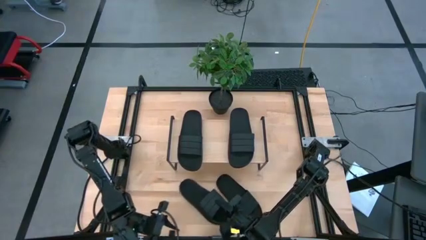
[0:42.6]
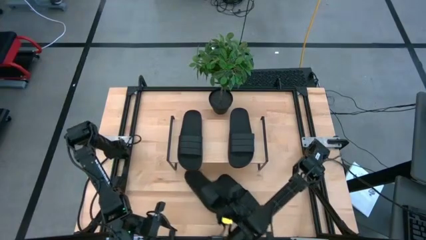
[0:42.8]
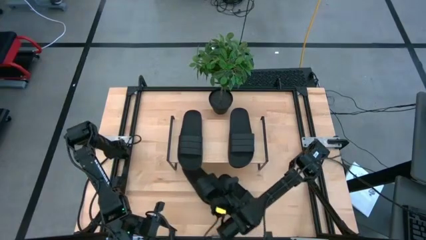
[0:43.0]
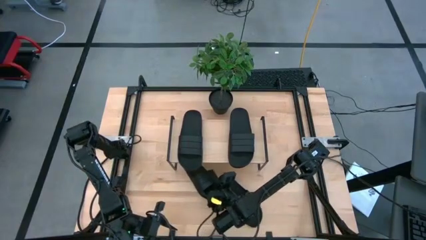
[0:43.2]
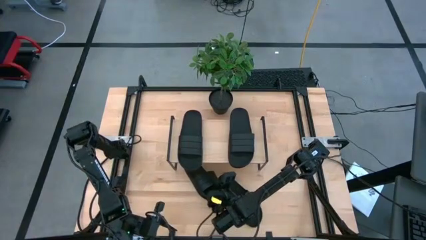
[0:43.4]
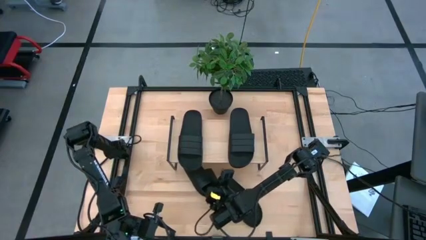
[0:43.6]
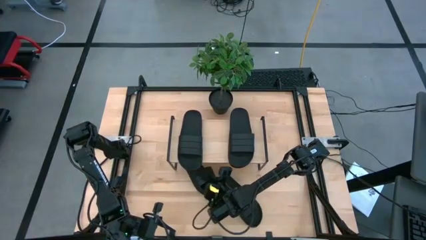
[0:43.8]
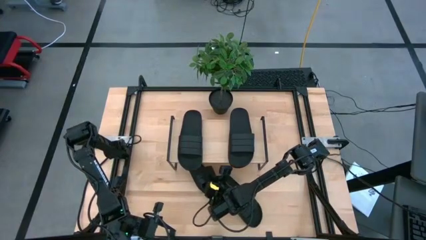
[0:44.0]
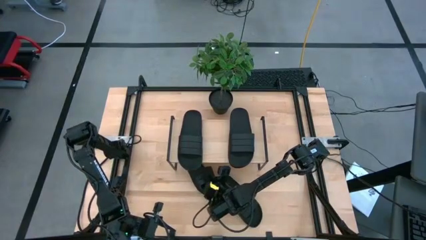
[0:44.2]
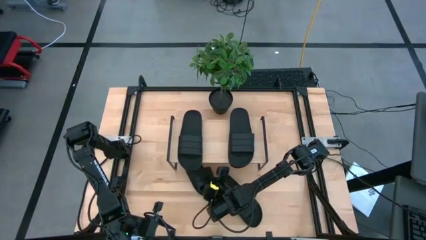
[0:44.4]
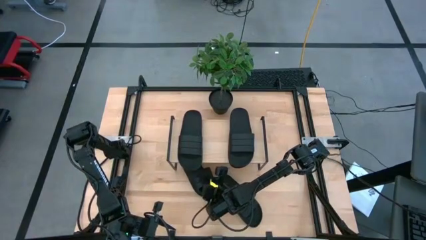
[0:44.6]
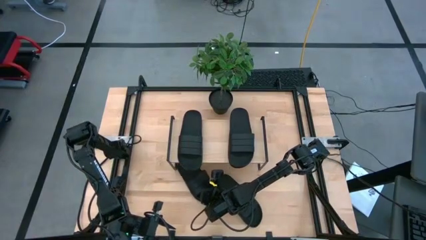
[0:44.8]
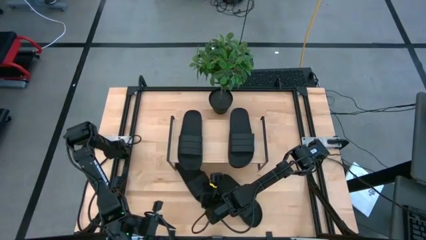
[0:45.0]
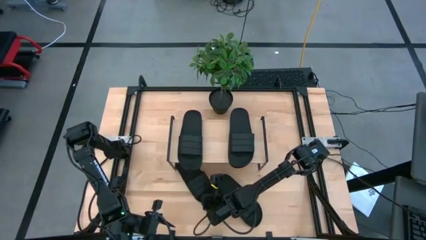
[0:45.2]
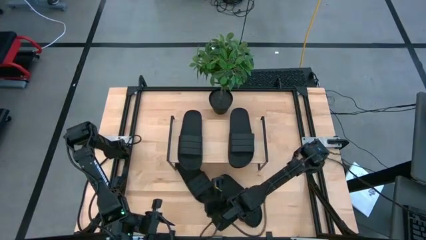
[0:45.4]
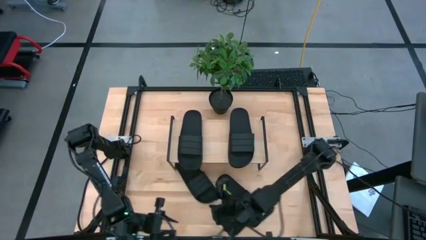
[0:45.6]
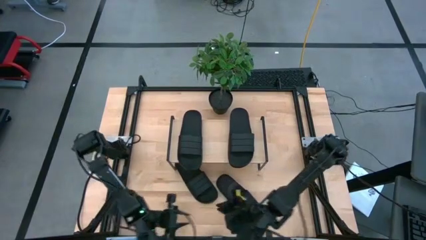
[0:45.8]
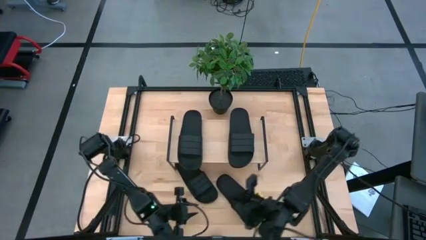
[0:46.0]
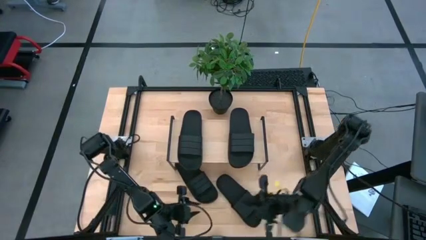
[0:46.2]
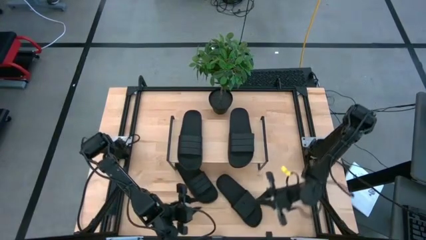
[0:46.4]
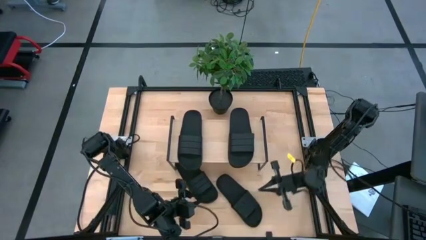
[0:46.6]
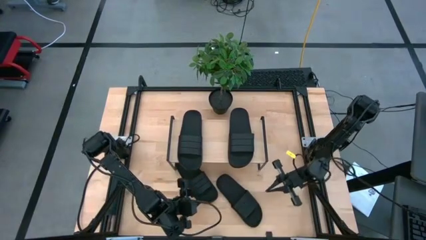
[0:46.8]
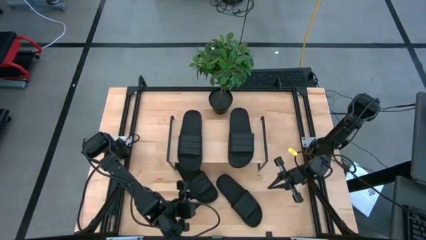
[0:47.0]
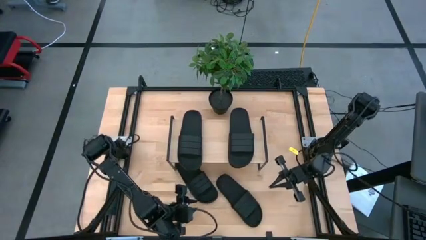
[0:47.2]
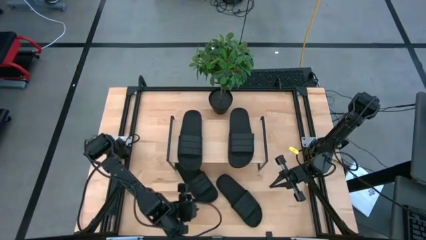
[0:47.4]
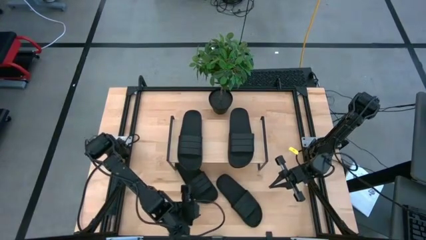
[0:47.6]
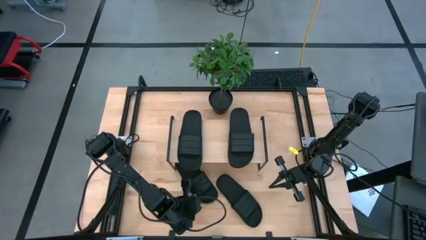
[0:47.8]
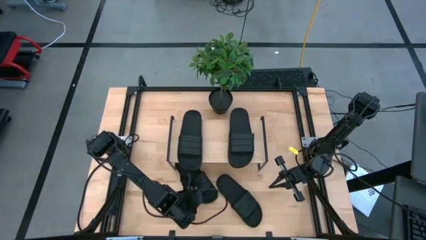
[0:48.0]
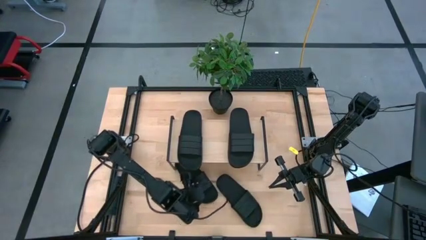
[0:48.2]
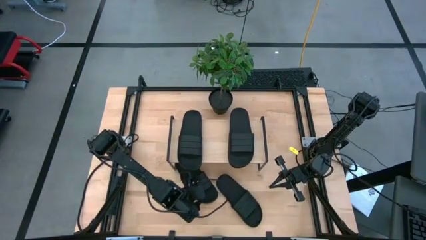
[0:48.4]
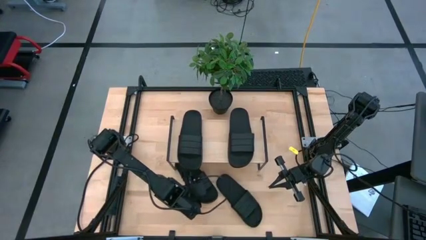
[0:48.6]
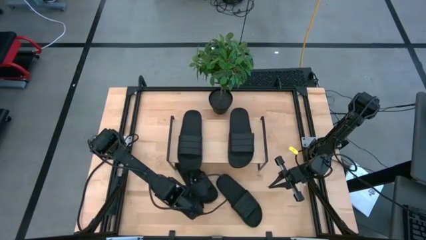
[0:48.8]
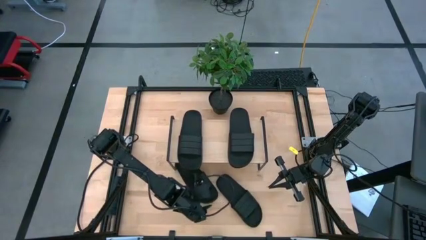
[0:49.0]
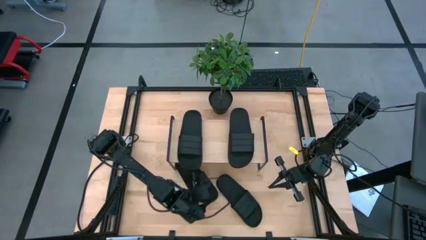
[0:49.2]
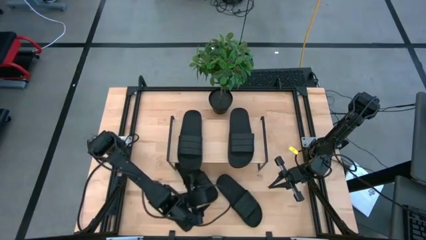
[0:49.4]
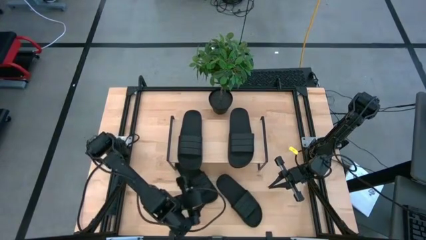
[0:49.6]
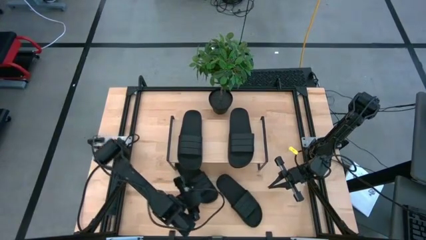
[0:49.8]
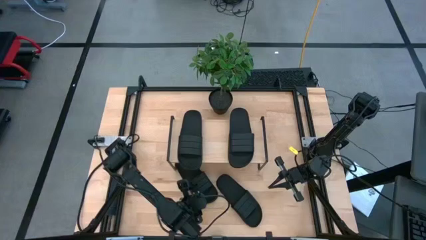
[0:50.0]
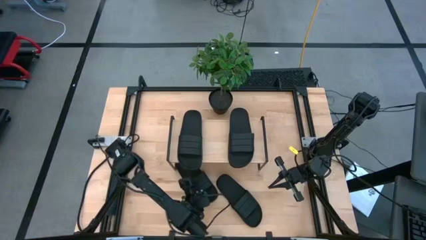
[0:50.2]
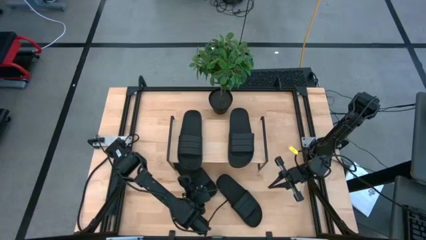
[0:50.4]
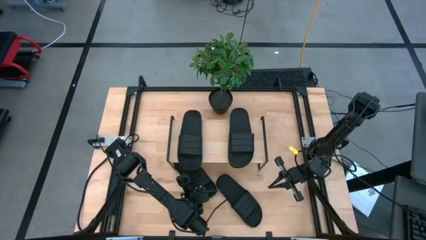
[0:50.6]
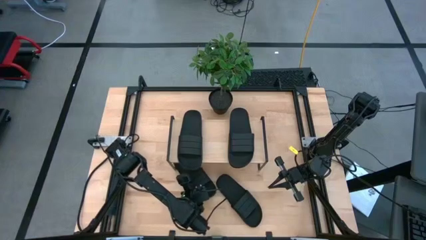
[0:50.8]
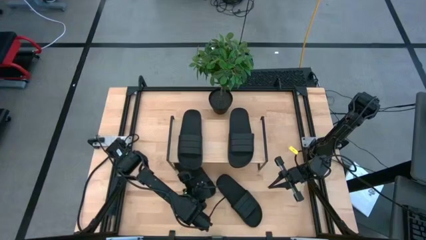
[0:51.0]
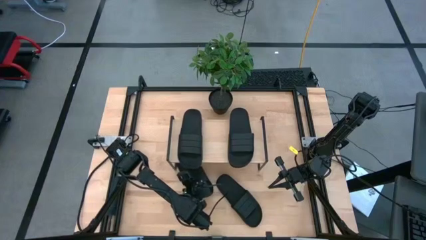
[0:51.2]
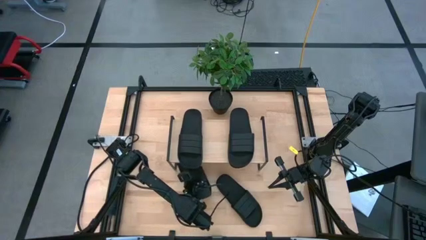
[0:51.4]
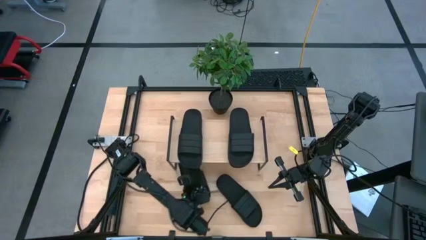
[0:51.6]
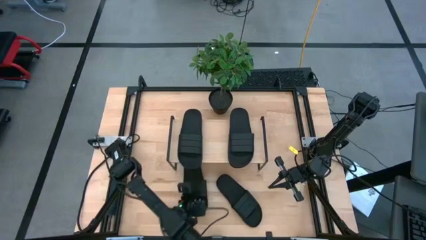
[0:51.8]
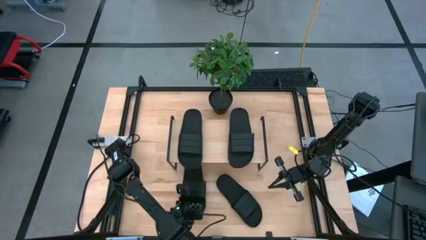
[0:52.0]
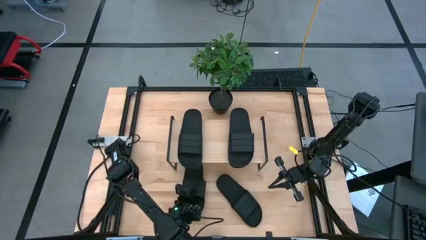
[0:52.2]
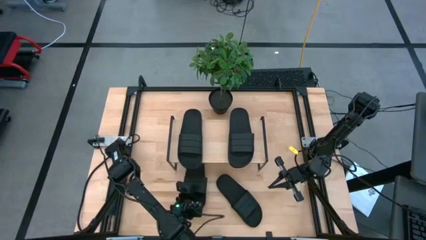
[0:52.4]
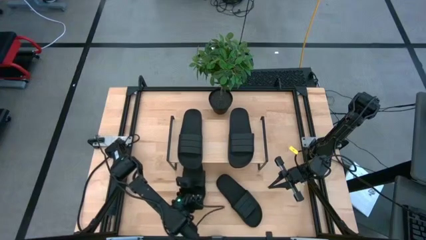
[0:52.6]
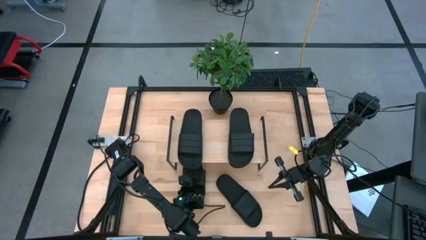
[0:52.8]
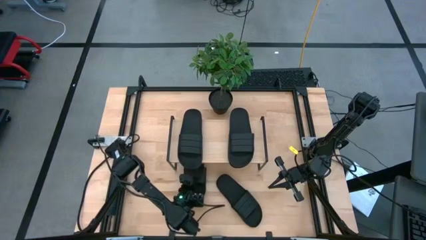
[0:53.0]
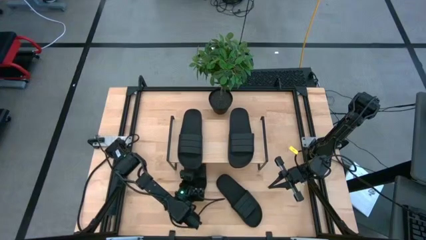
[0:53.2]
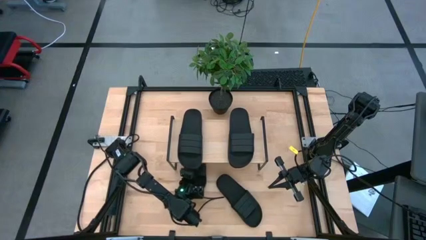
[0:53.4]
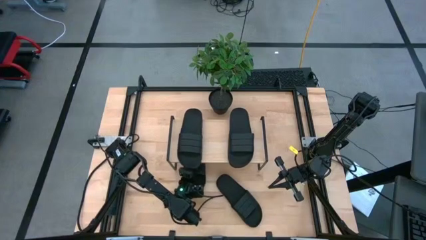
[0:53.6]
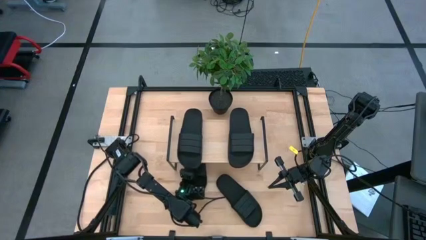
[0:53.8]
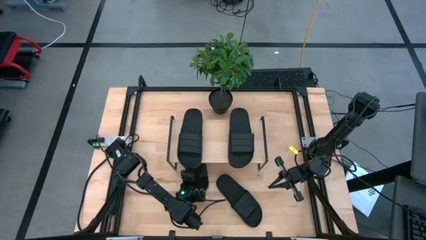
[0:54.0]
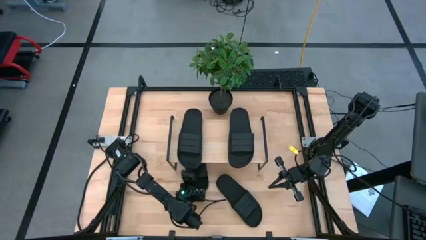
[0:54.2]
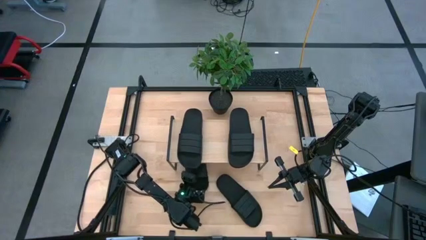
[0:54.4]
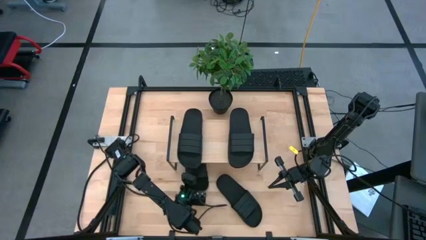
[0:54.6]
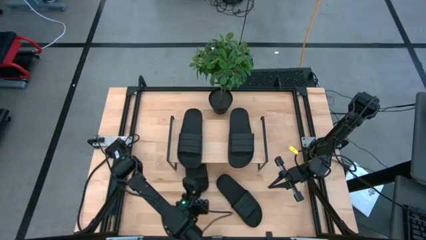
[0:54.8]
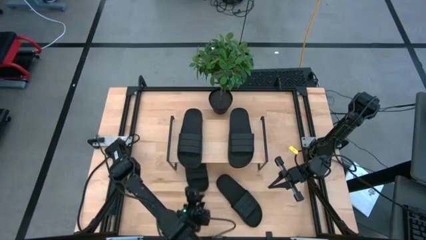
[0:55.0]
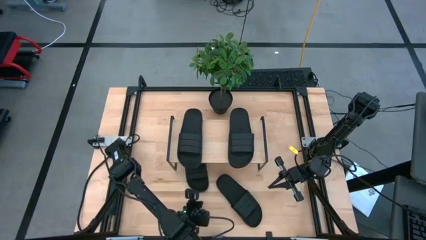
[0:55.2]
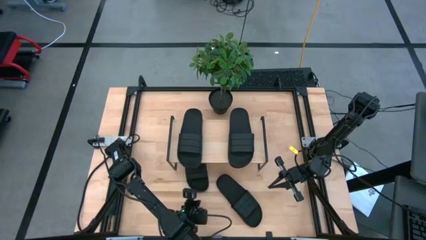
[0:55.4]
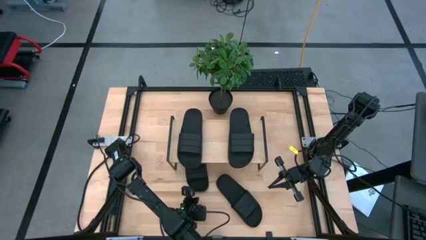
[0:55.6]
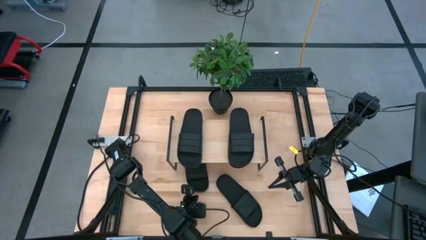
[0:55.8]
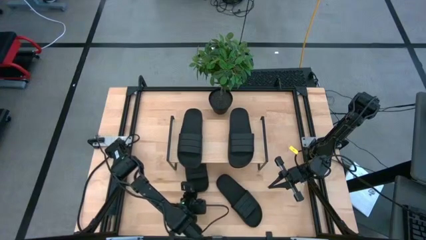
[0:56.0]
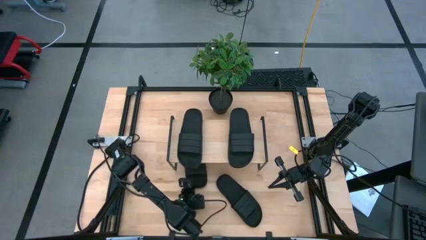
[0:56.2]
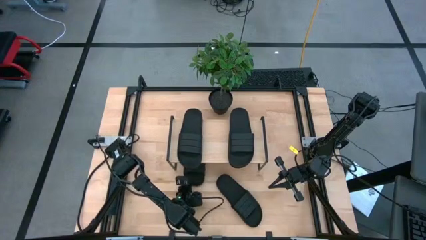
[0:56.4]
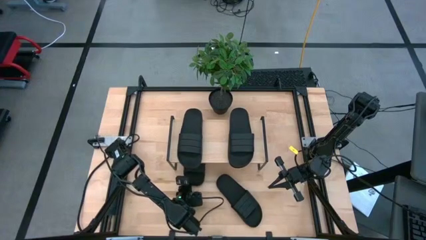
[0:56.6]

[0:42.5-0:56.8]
Task: Pick and place slides into the shelf
Put the left black slide under the shelf
